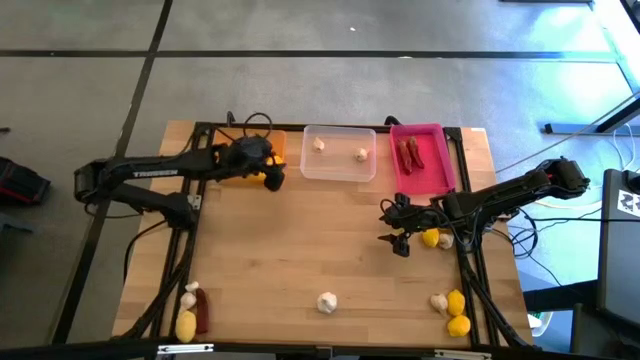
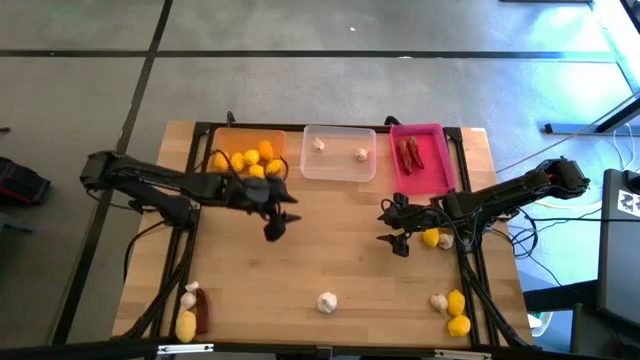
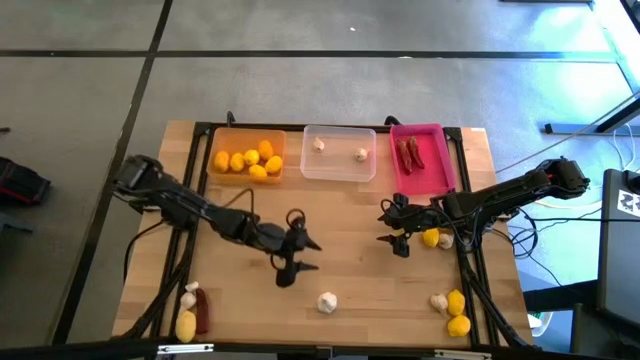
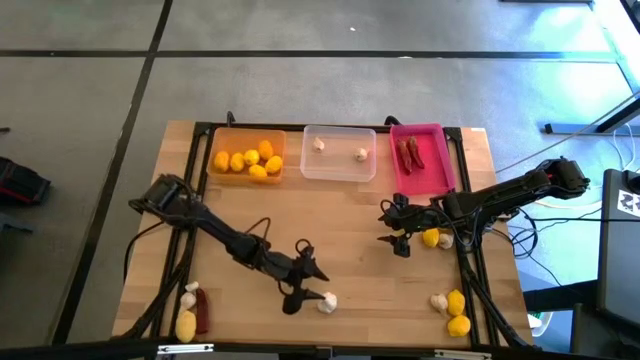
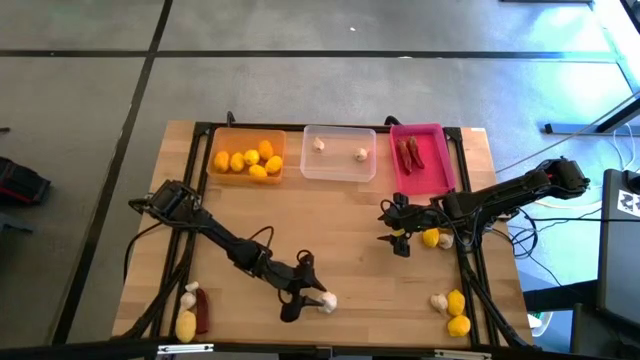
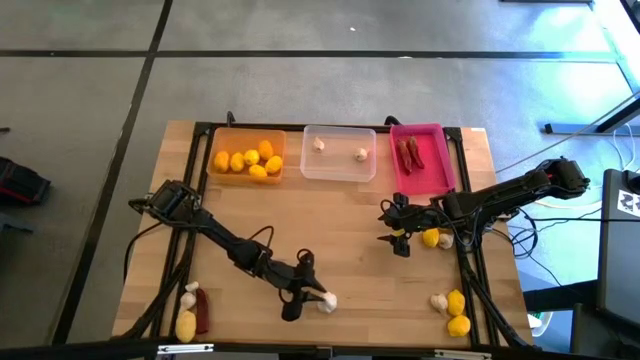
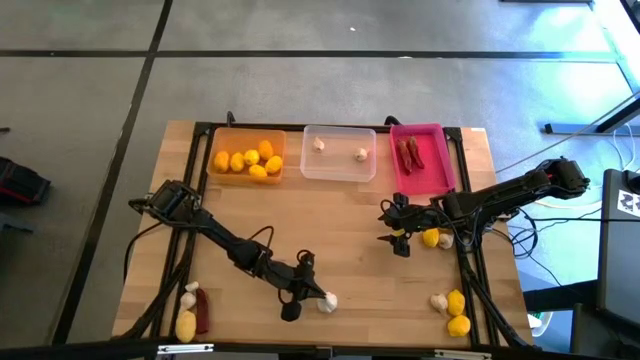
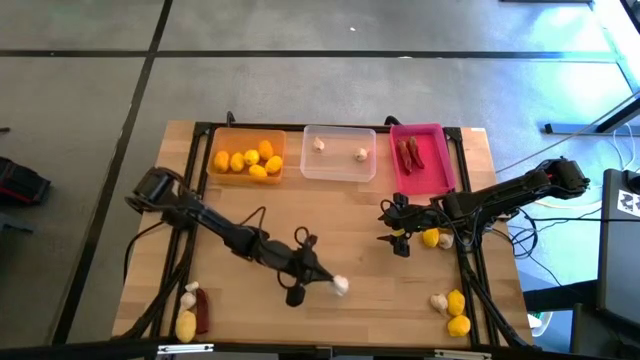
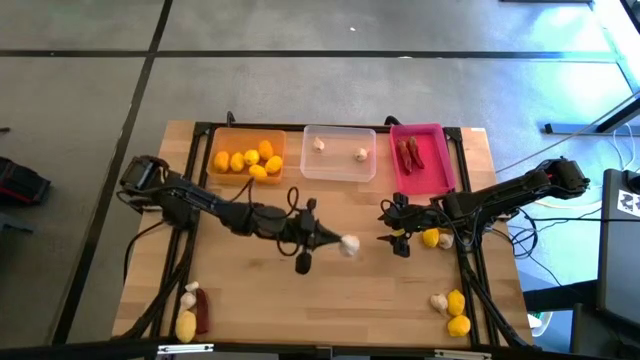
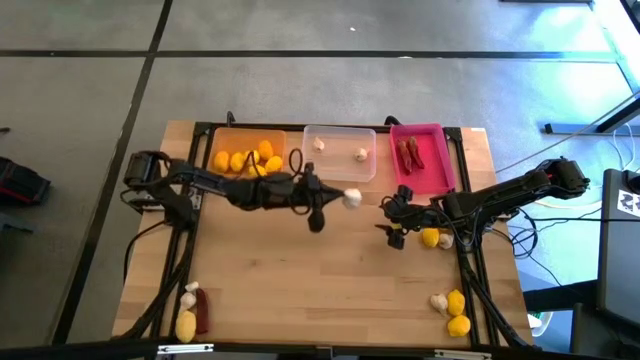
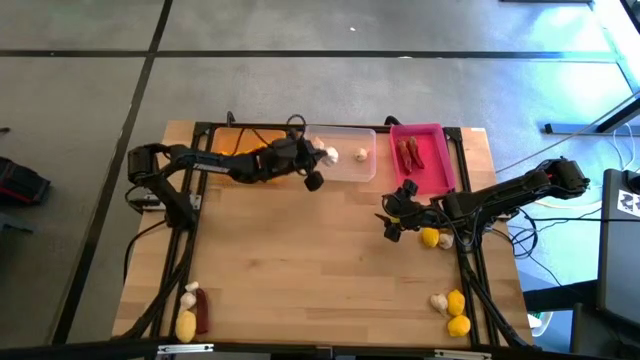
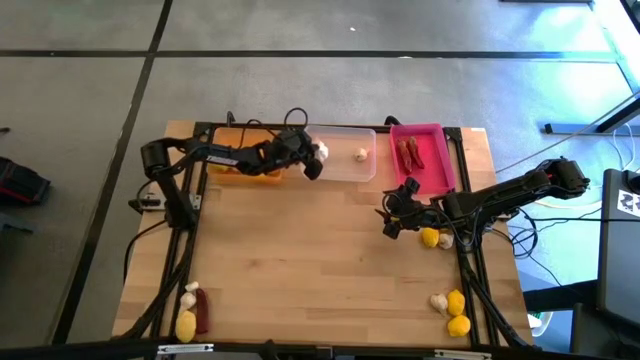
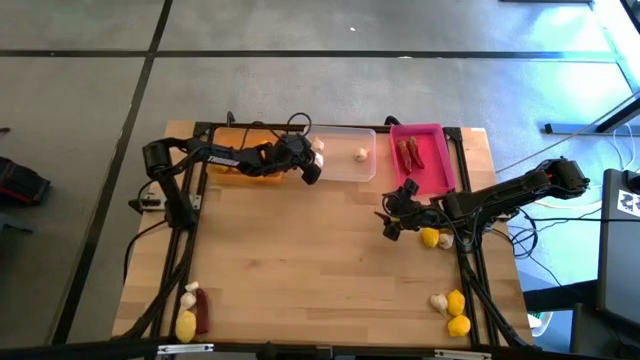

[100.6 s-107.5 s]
Task: Sort produce into baskets
Put the white garlic into transparent bin

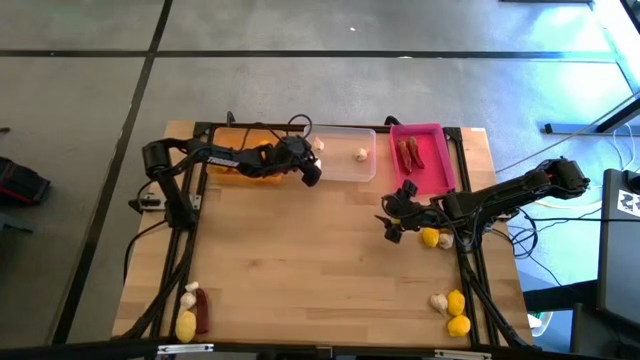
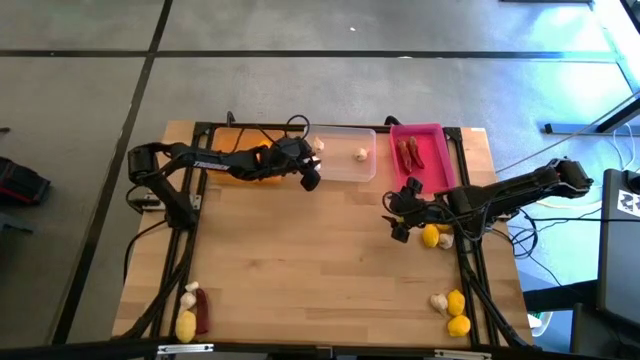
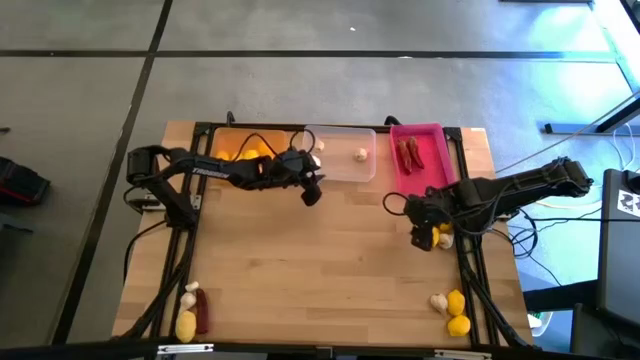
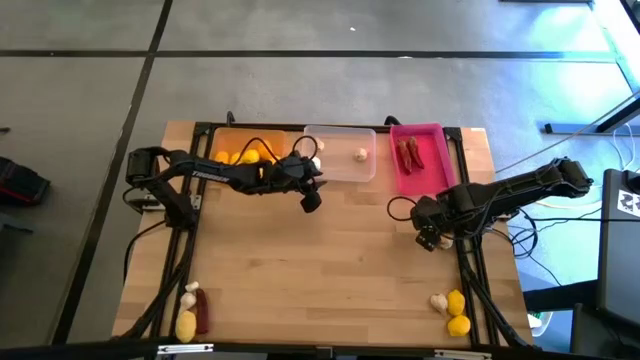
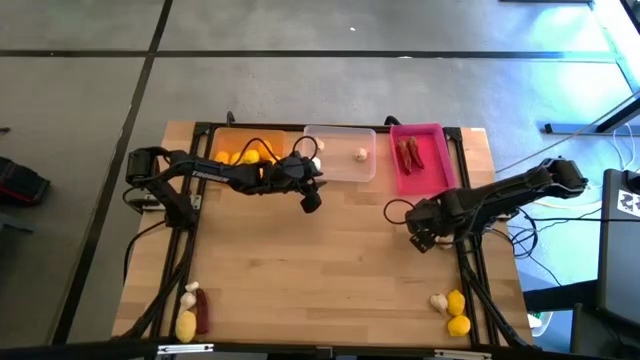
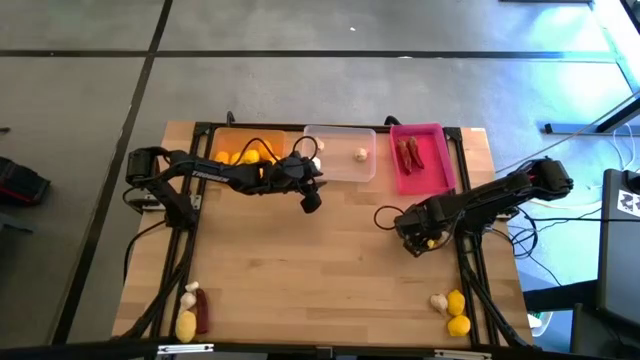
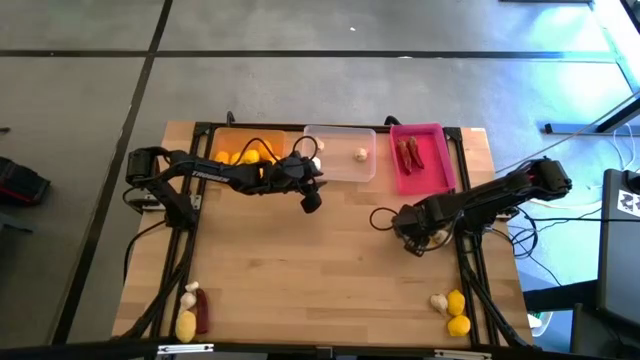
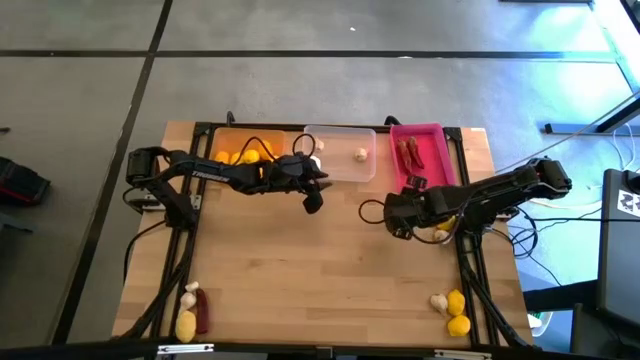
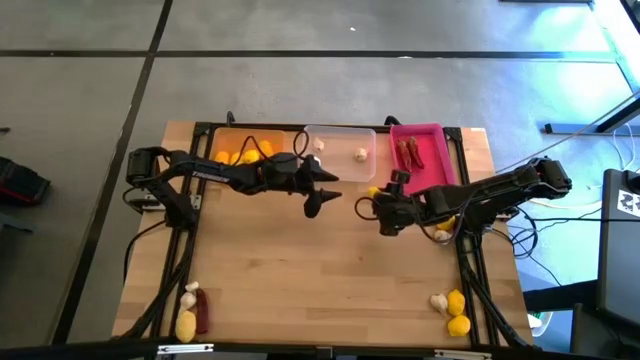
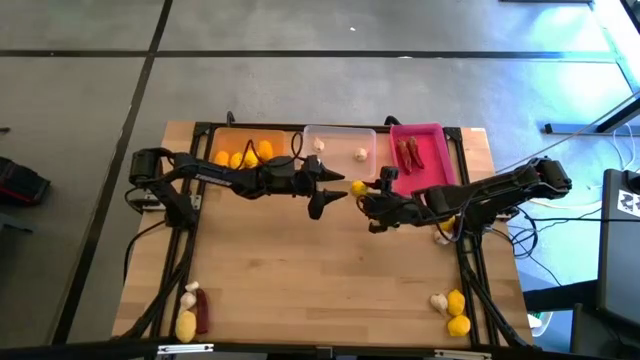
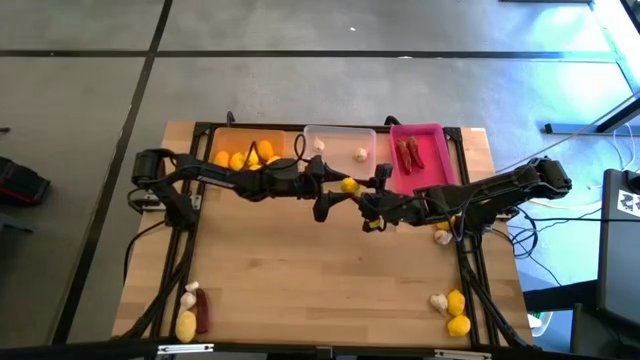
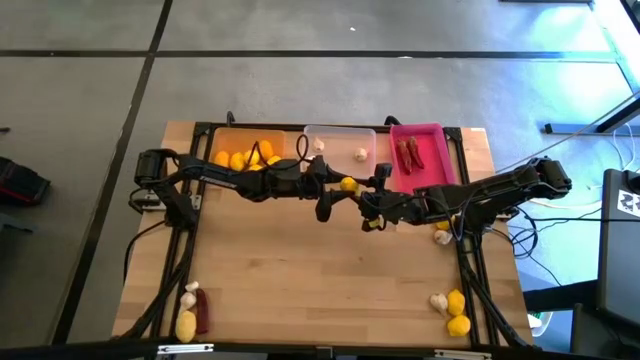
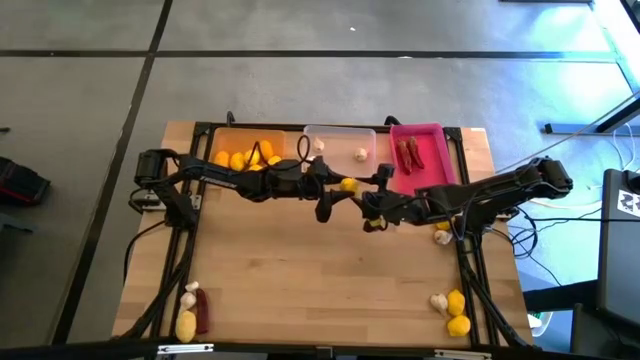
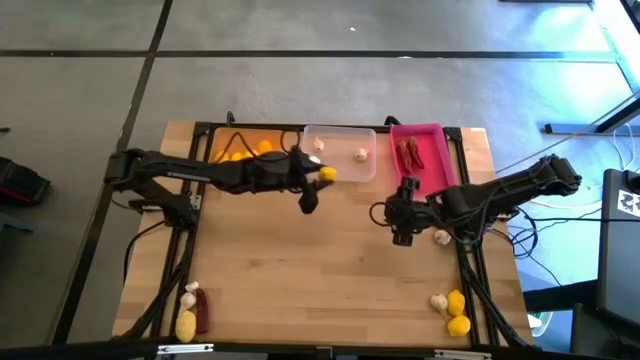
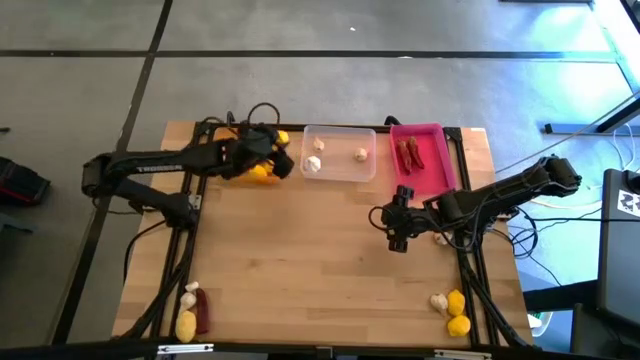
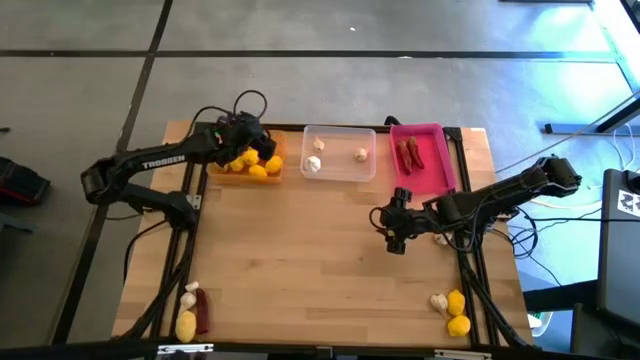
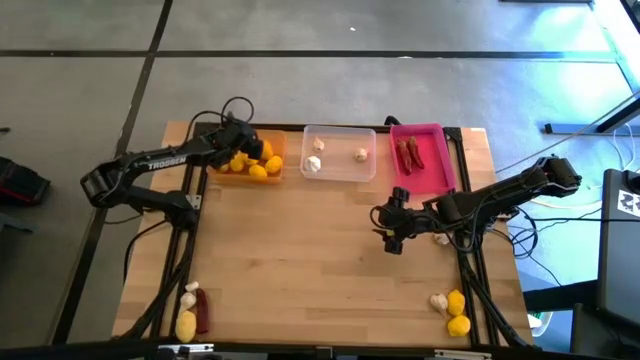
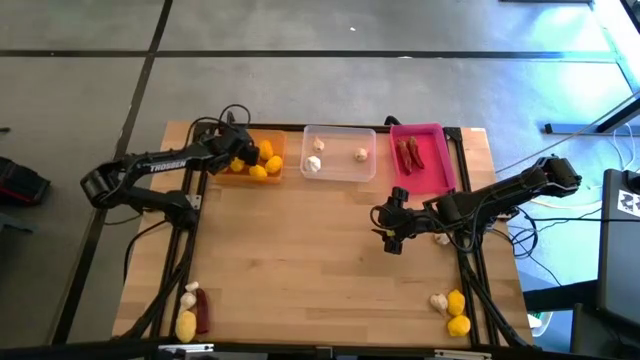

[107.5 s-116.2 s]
Put the yellow lemon into the orange bin

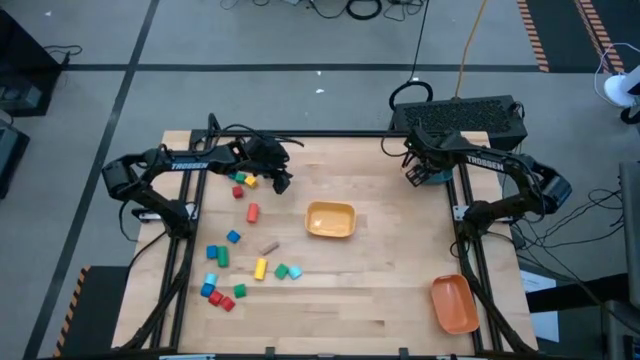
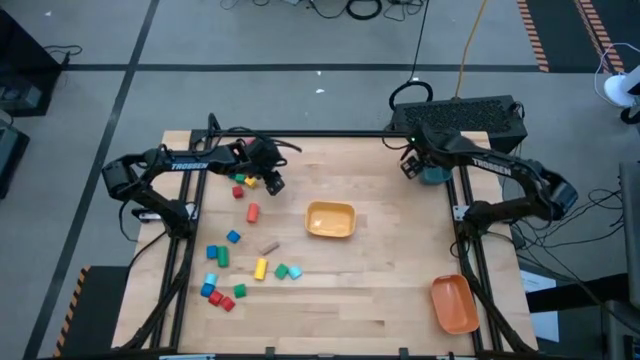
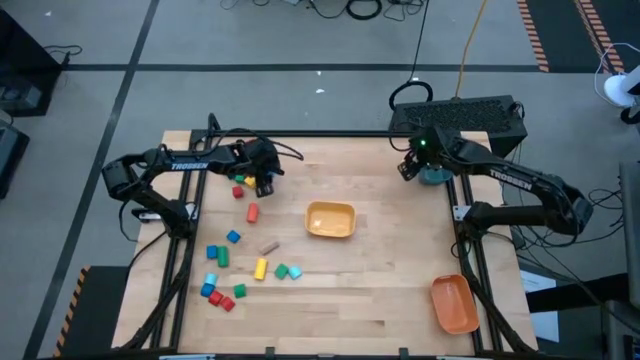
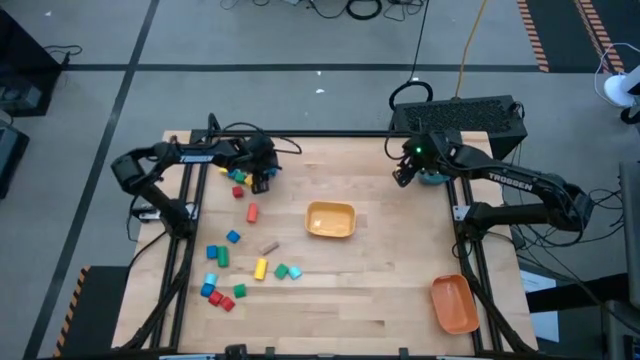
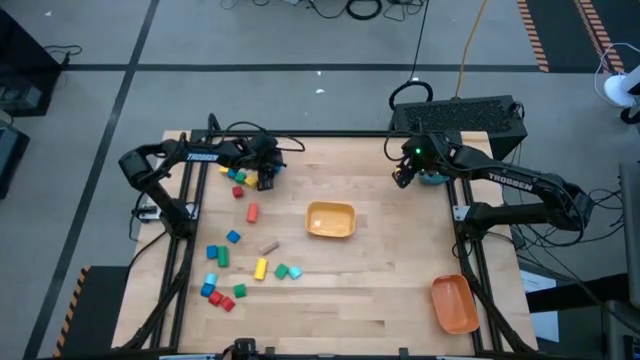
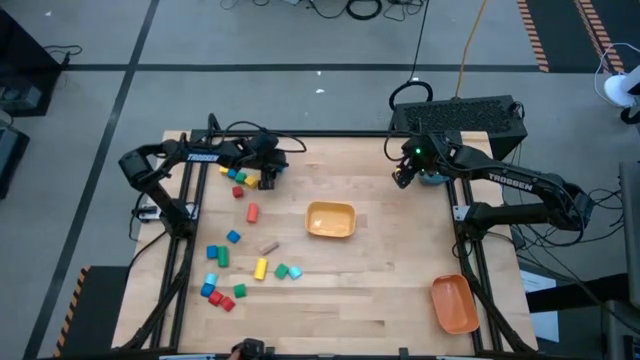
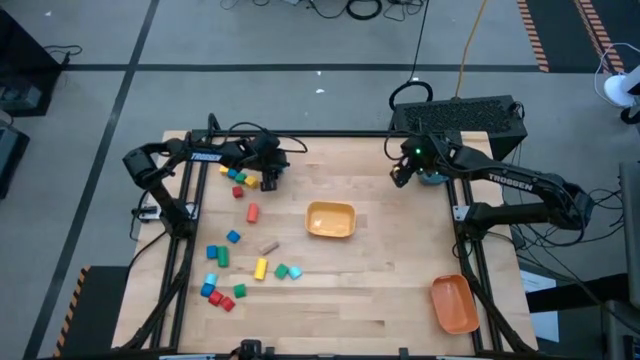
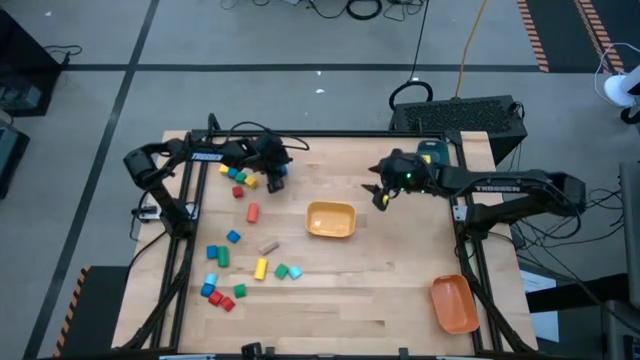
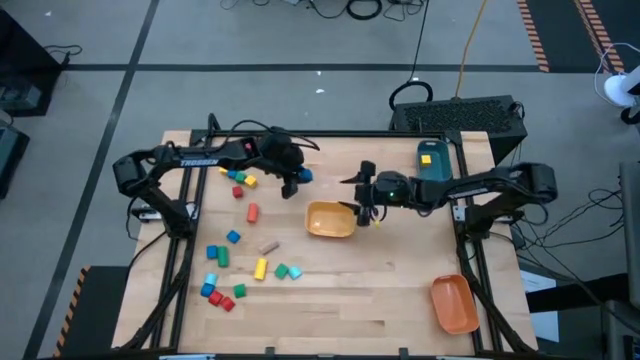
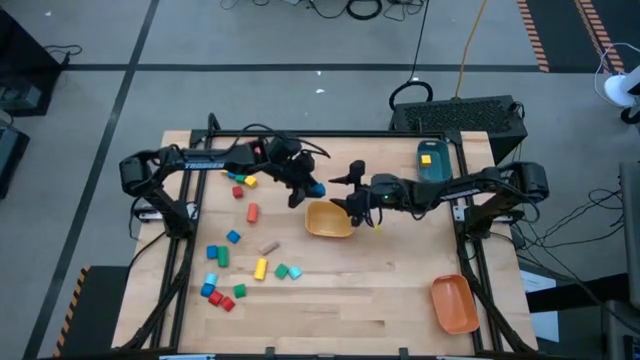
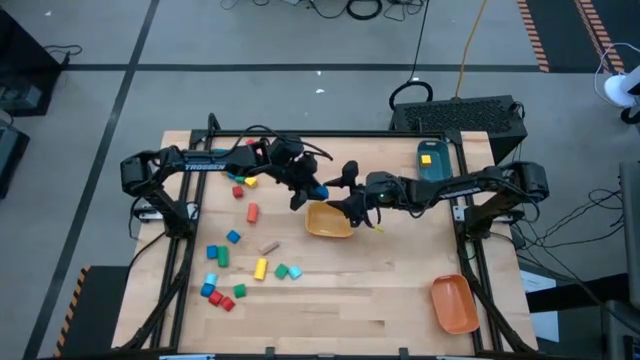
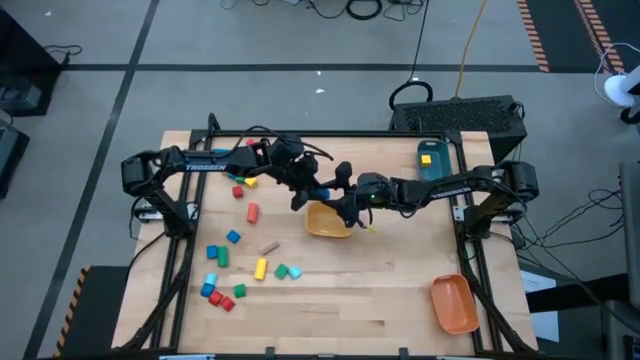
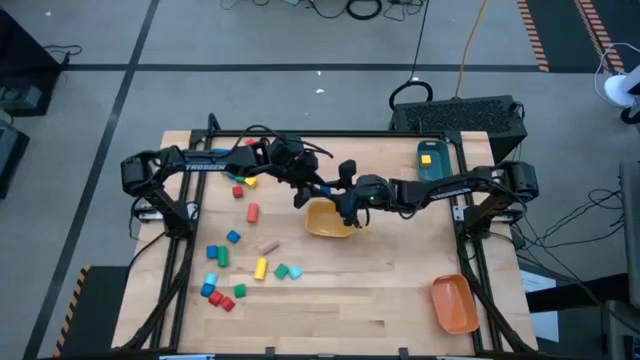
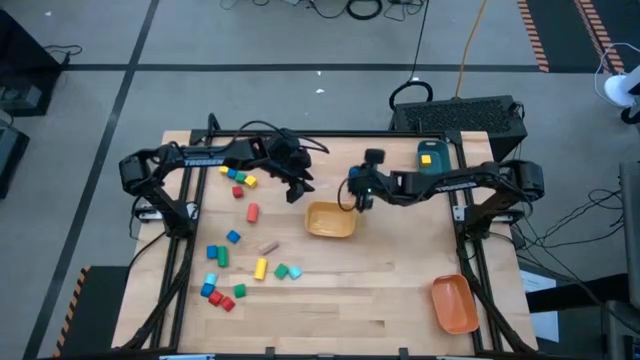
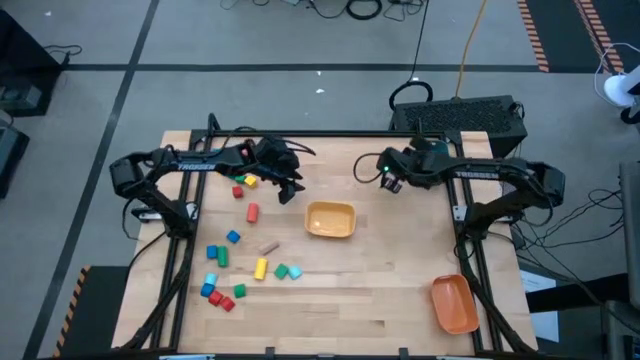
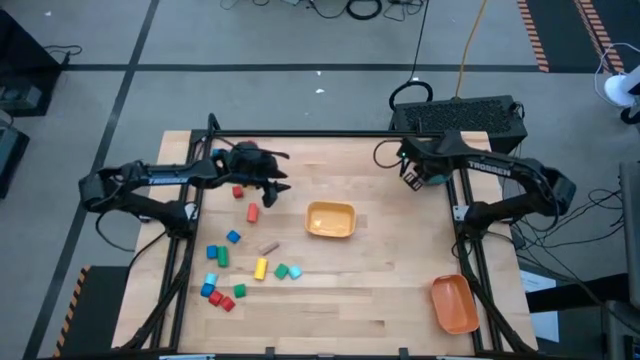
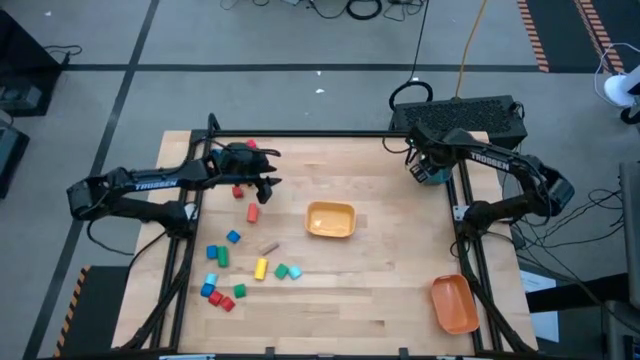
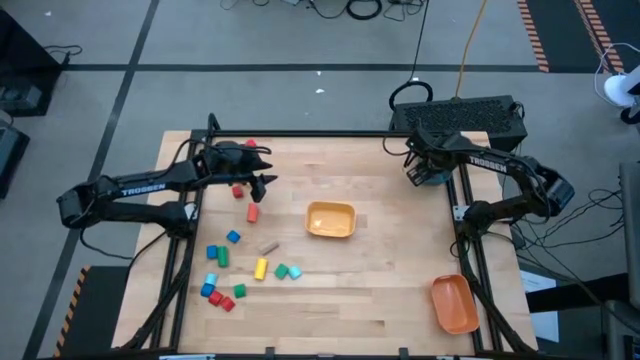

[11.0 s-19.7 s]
Task: Sort blocks by size
Put the blue square block into the blue bin
